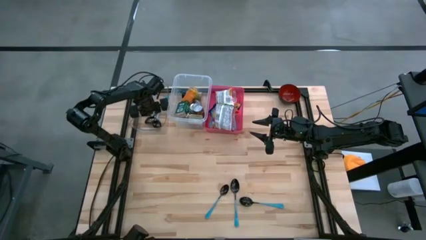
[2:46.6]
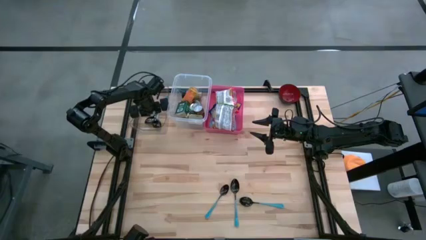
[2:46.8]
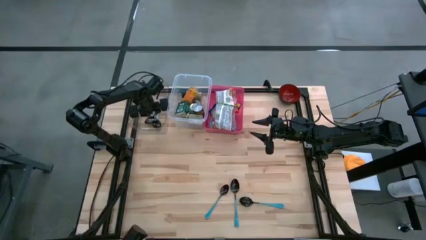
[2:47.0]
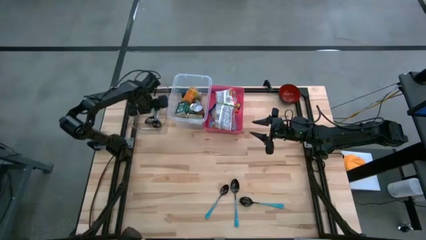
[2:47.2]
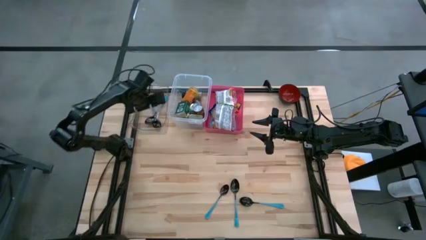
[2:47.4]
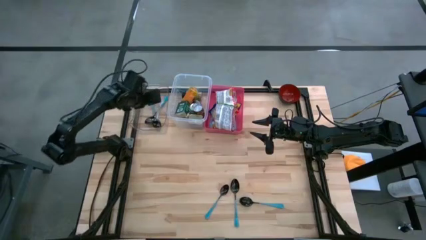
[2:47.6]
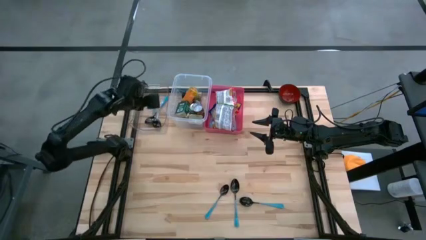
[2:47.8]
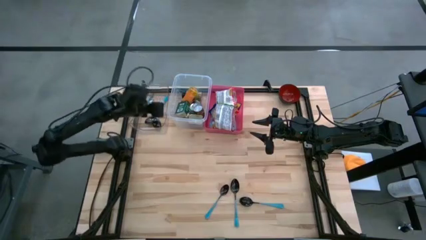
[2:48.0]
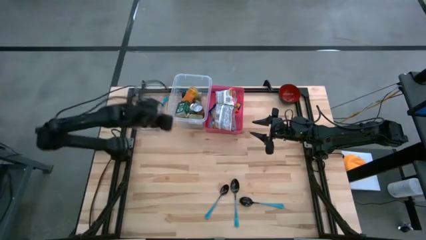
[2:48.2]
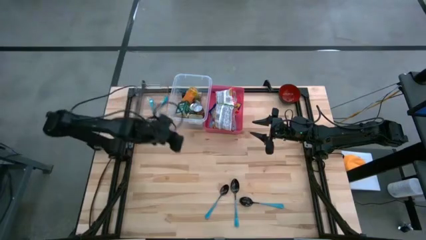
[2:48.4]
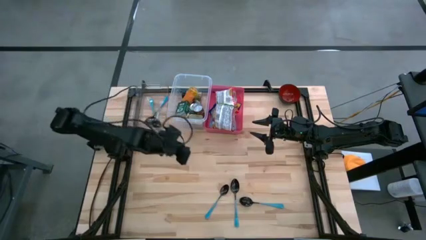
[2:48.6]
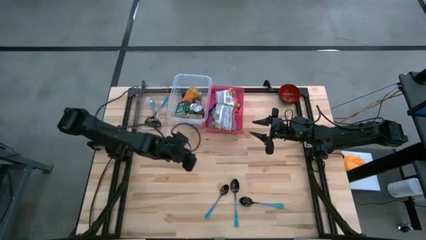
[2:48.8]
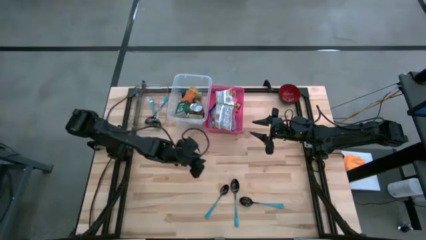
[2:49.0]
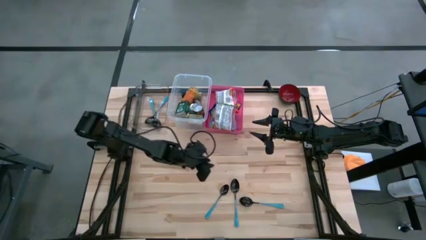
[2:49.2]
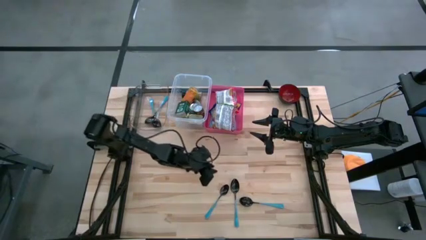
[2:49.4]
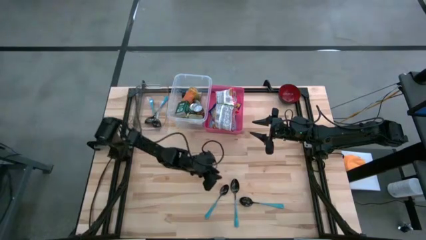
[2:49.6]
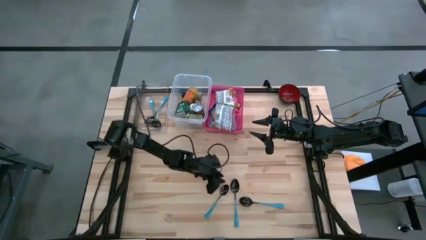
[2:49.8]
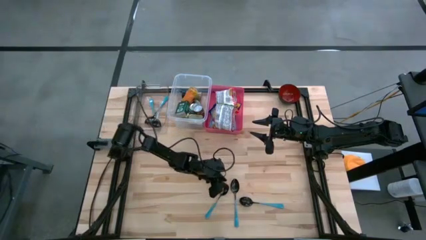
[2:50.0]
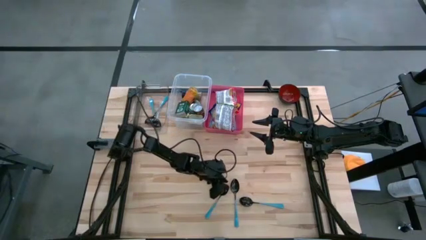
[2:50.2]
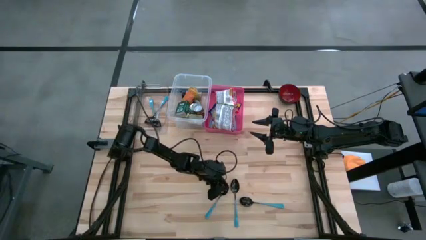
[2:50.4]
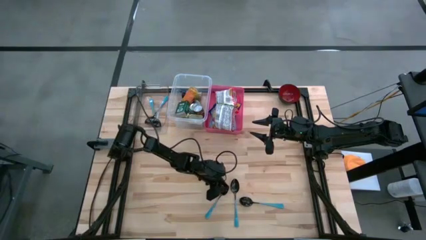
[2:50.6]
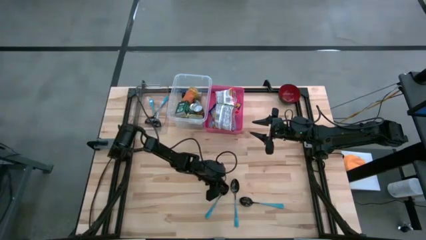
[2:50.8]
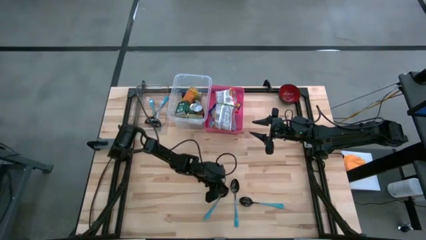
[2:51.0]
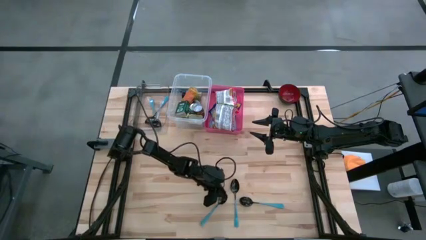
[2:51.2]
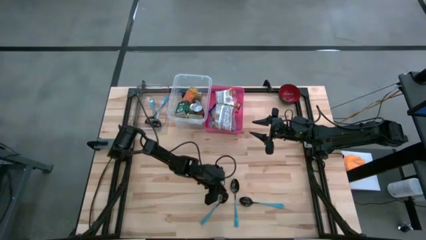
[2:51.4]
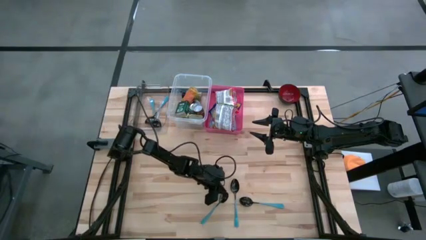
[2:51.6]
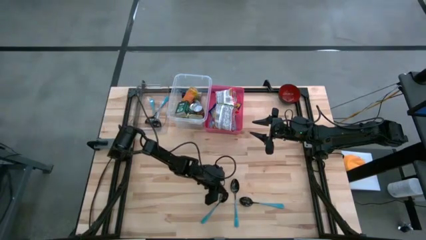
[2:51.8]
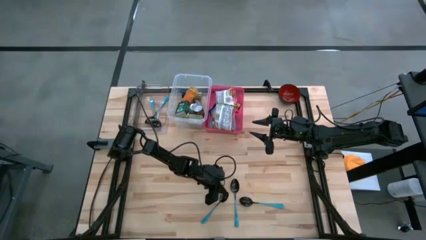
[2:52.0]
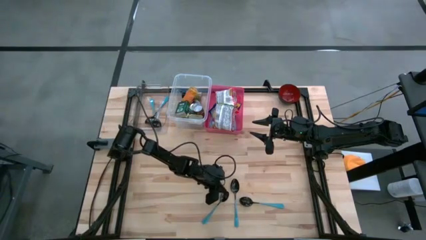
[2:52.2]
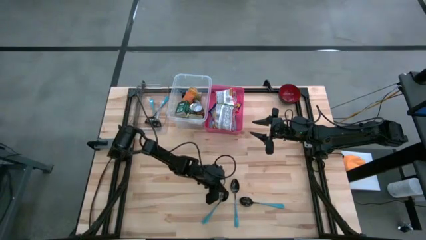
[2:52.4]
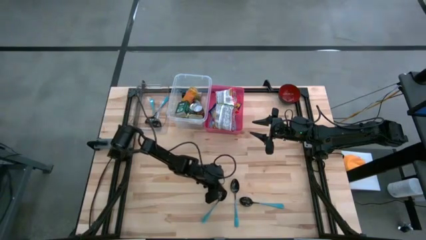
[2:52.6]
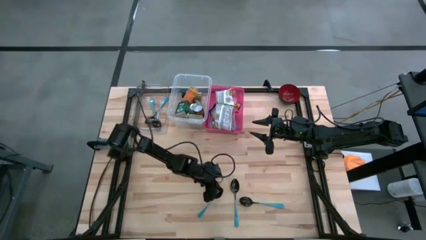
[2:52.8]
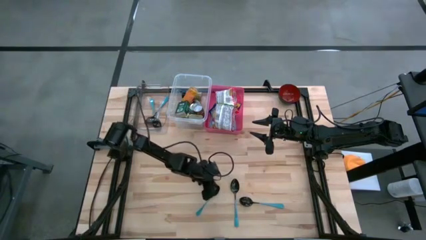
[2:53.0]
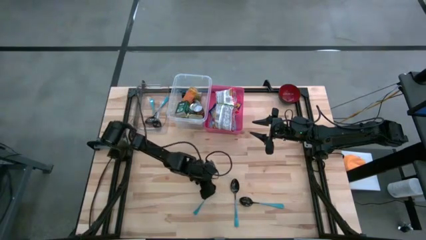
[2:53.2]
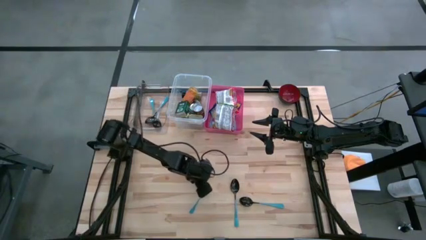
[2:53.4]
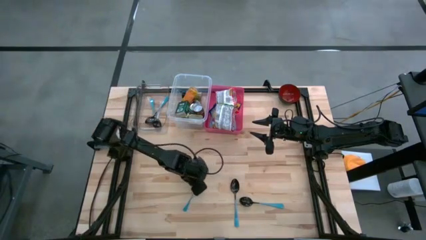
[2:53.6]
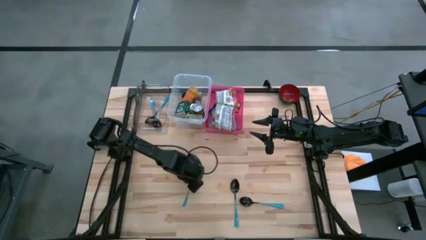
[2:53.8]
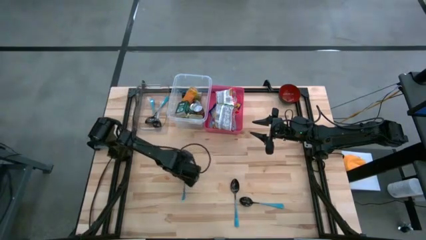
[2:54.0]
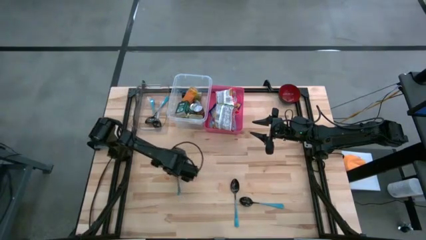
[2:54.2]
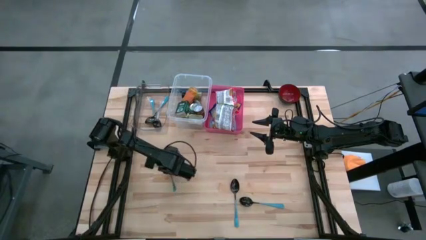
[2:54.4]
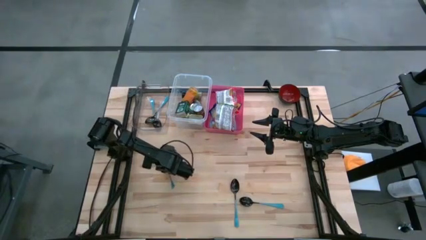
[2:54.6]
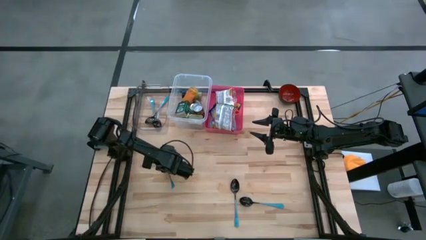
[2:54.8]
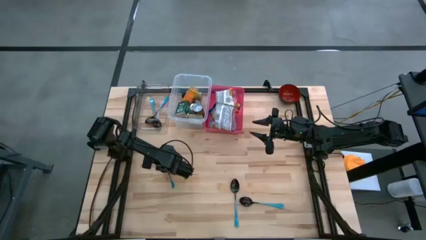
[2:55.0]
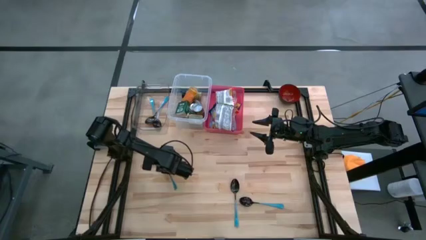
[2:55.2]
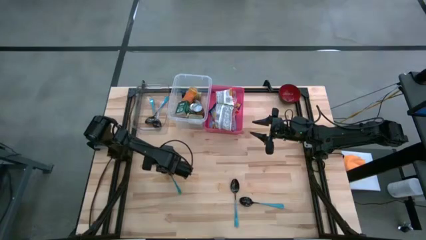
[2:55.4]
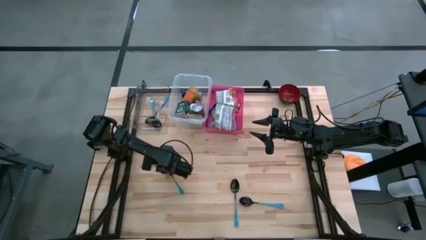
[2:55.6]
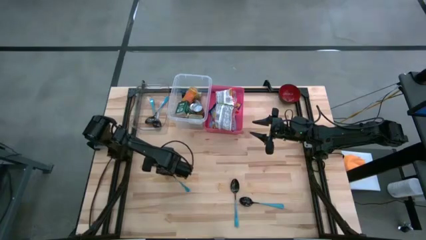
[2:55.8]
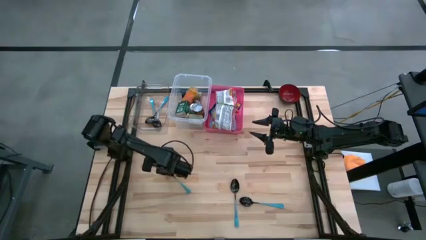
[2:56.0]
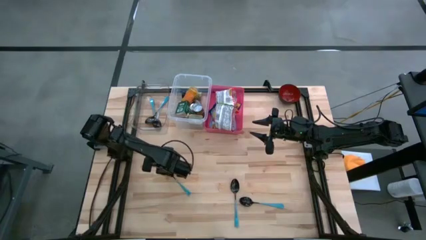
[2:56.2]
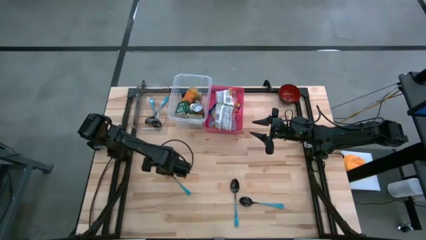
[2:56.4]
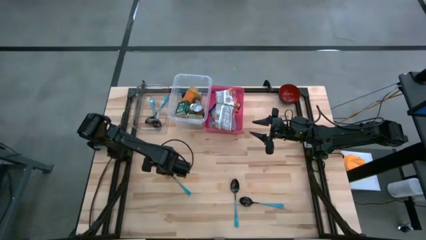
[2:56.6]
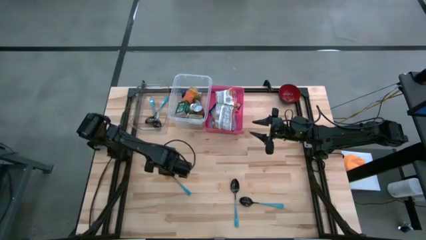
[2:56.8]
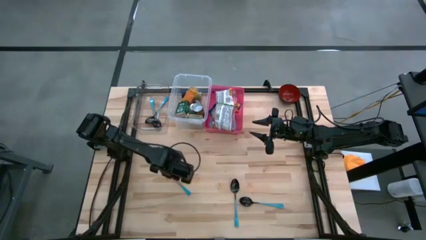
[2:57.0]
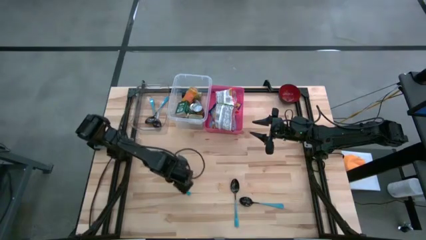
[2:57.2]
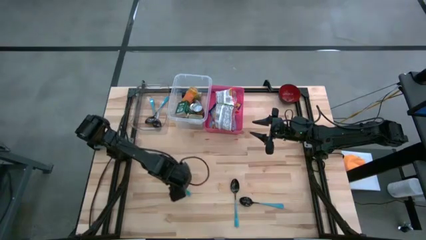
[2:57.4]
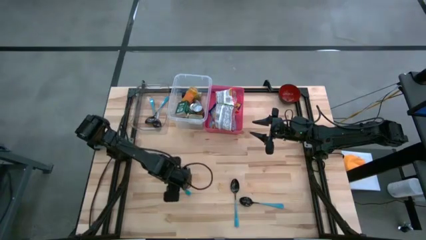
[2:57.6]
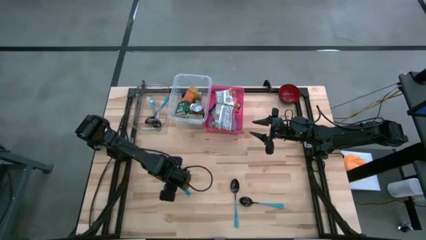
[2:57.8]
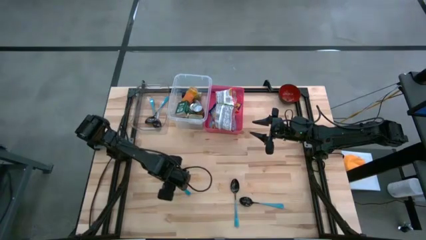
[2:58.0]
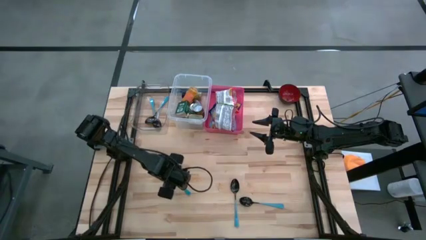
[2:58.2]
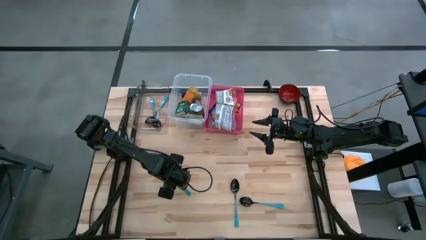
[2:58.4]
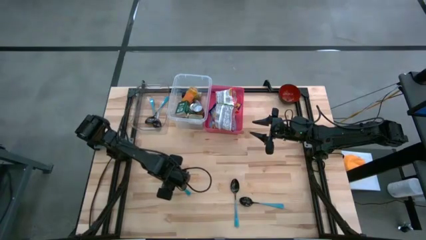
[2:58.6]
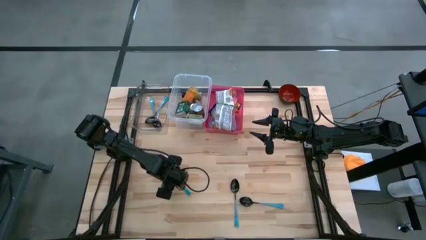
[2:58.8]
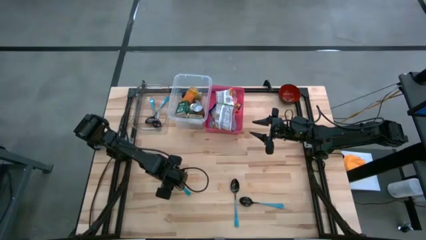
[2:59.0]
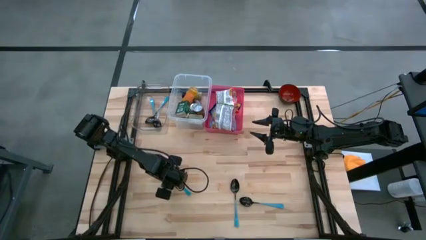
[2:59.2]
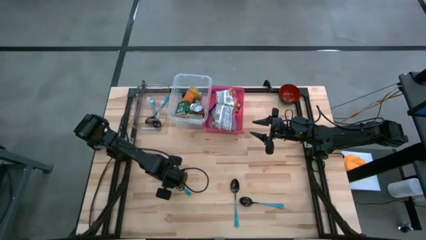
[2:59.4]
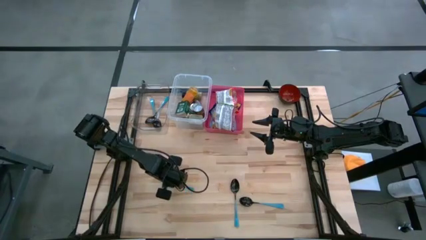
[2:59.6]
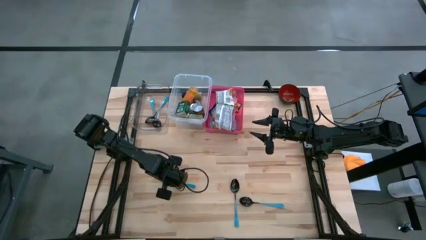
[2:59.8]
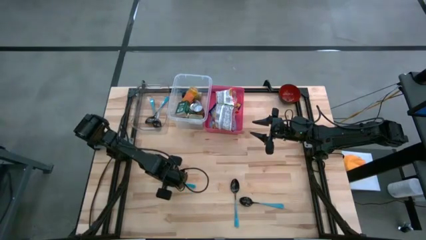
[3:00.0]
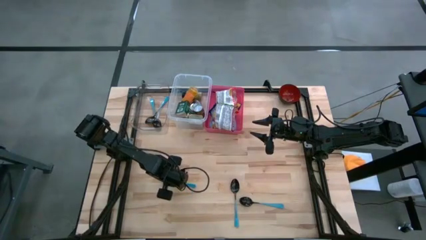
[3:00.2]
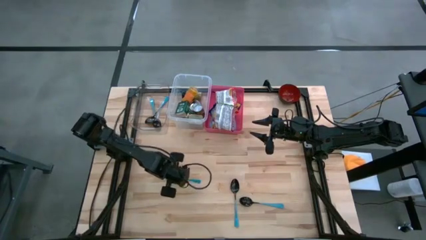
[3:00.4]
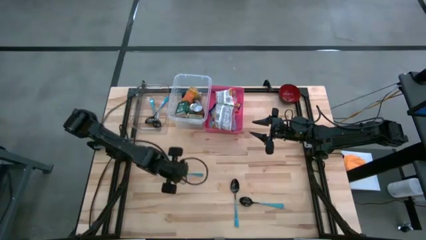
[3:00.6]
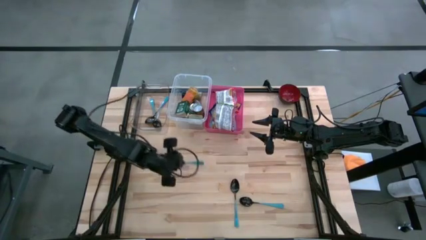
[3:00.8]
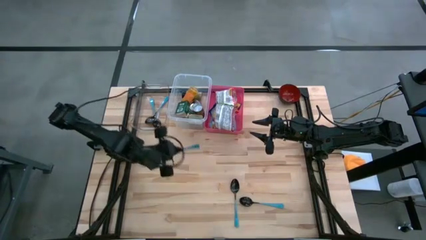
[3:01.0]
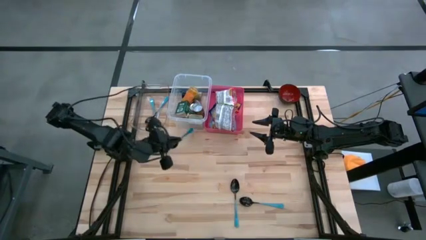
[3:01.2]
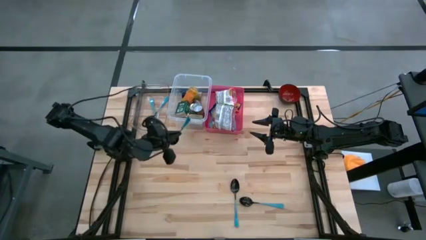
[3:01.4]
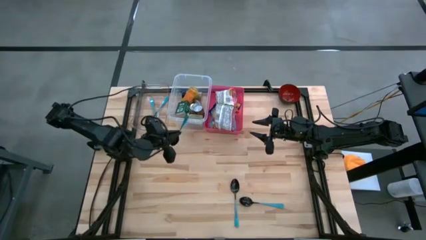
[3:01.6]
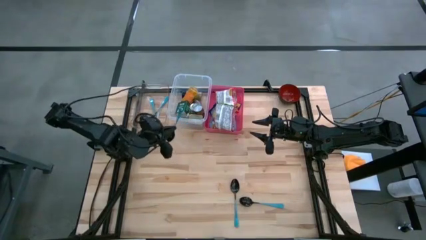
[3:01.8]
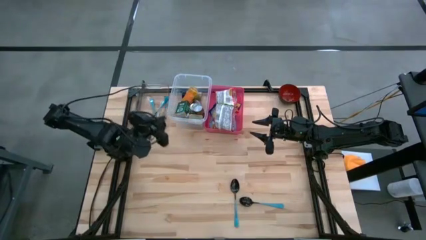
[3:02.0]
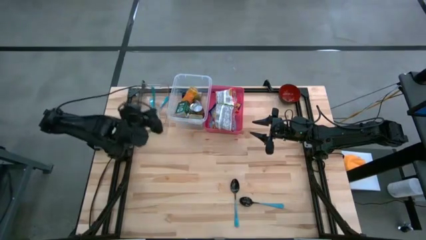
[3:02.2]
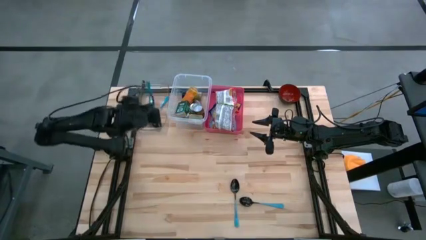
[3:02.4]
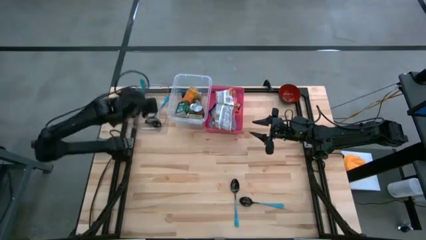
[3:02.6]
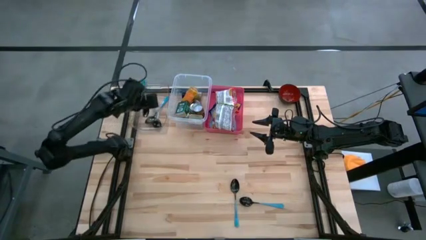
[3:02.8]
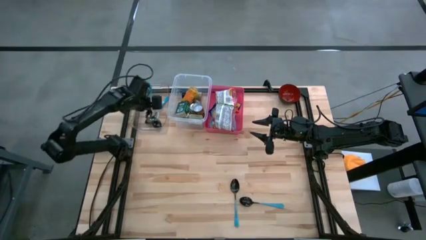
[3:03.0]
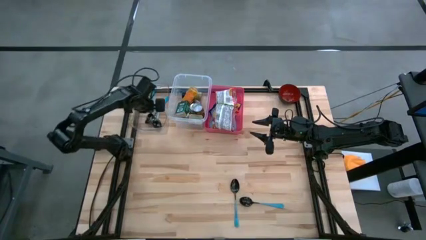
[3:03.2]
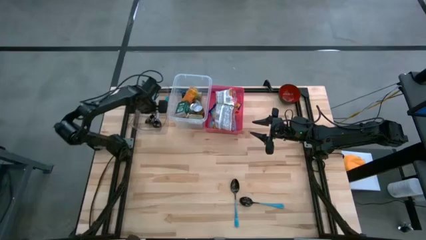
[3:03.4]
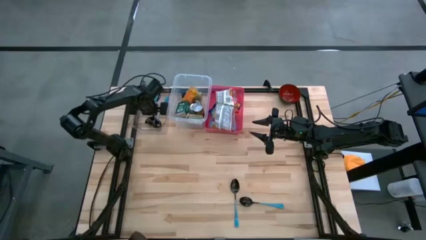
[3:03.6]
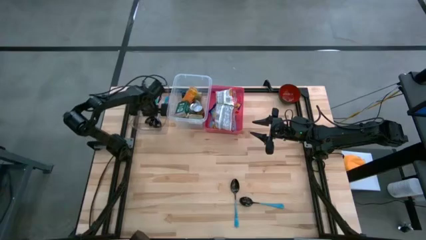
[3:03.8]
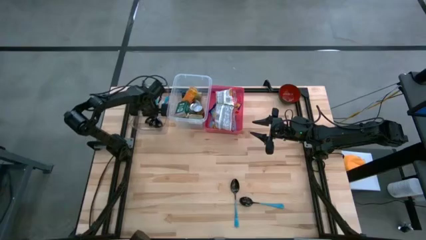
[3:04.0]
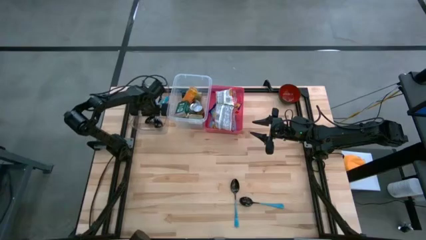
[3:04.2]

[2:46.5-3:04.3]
Put the blue spoon into the left transparent bin
